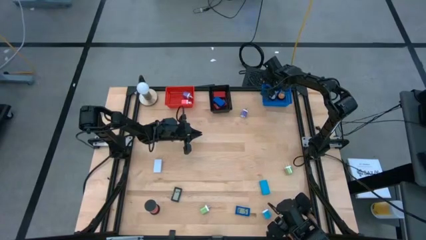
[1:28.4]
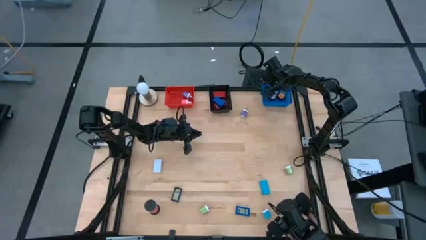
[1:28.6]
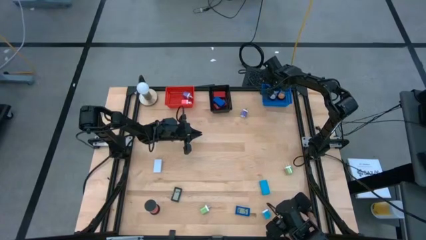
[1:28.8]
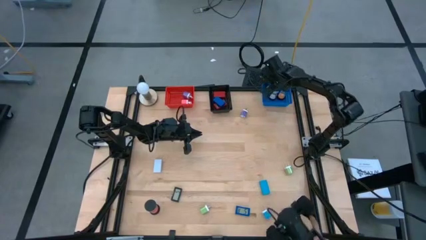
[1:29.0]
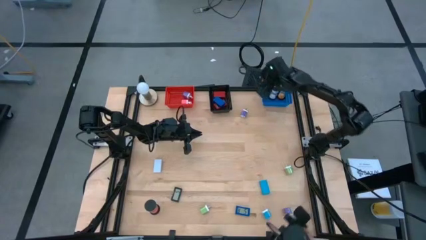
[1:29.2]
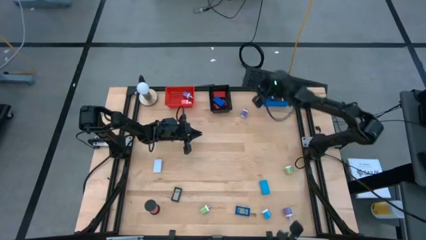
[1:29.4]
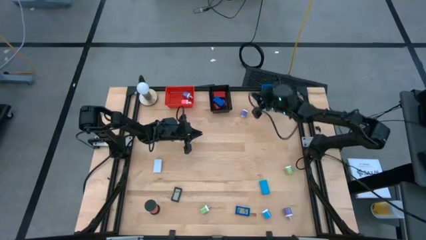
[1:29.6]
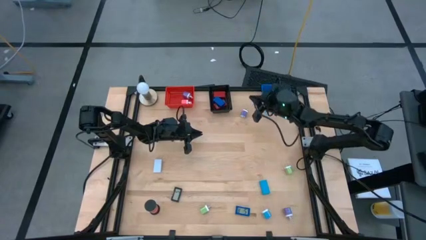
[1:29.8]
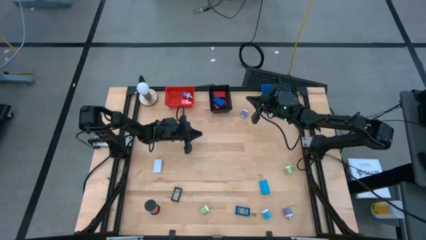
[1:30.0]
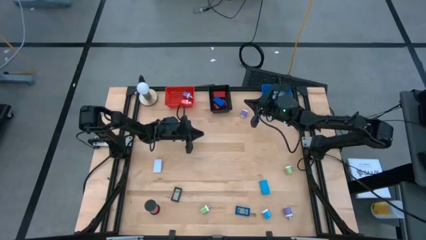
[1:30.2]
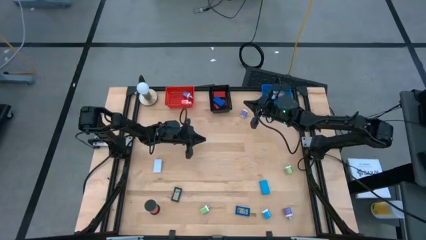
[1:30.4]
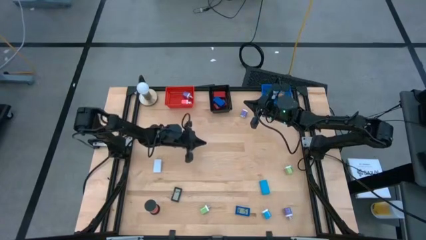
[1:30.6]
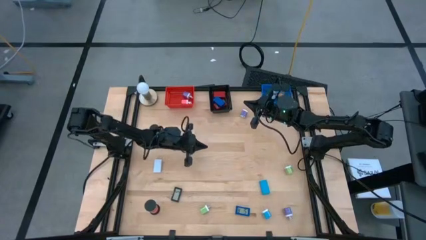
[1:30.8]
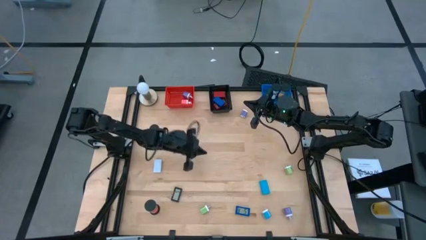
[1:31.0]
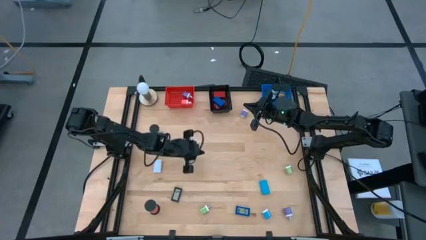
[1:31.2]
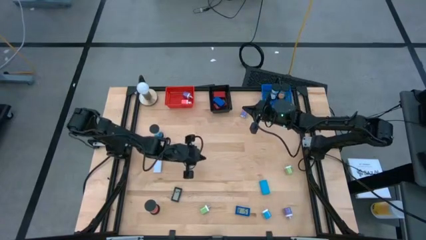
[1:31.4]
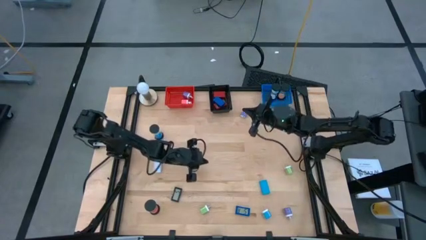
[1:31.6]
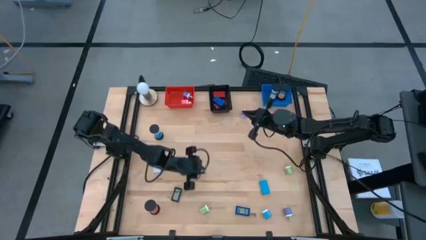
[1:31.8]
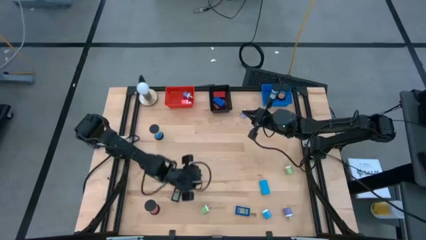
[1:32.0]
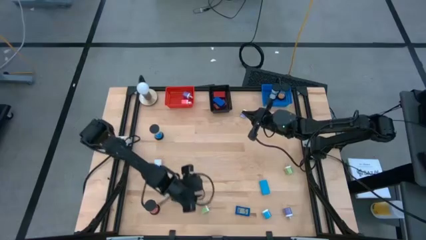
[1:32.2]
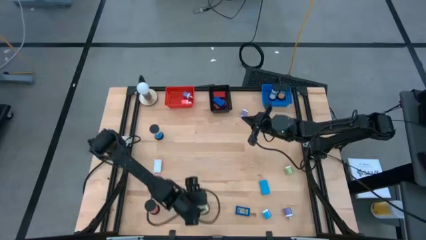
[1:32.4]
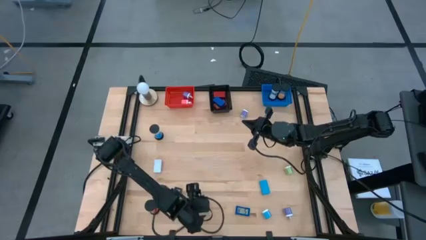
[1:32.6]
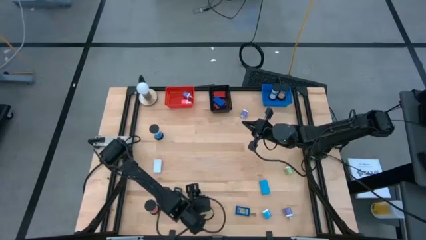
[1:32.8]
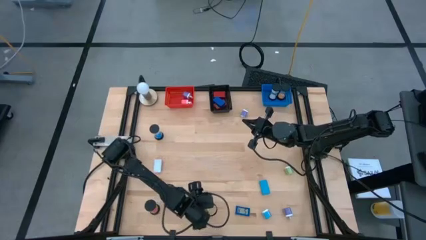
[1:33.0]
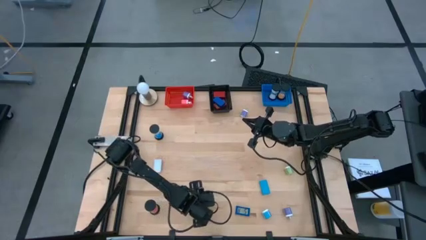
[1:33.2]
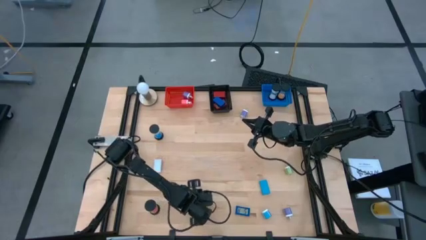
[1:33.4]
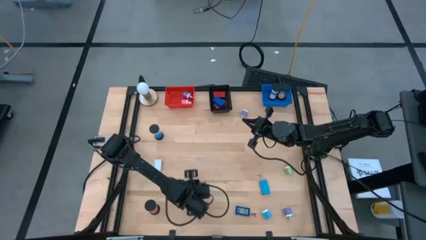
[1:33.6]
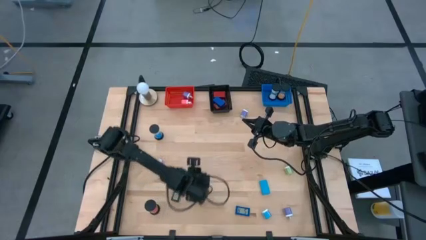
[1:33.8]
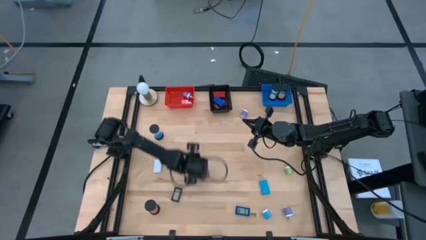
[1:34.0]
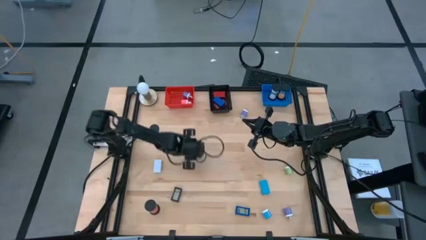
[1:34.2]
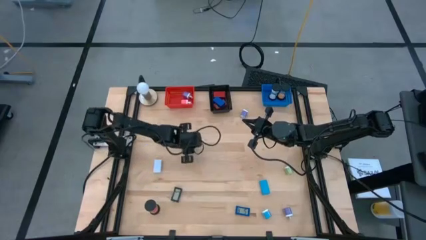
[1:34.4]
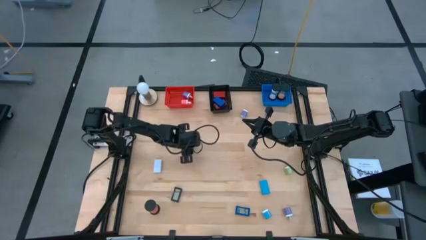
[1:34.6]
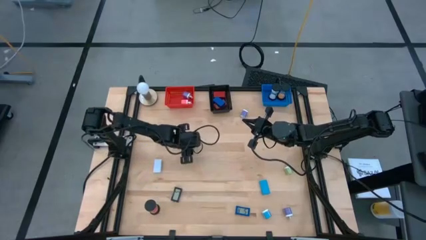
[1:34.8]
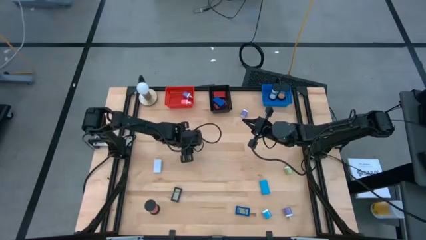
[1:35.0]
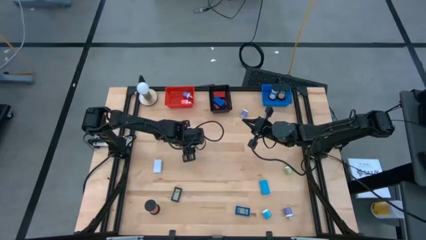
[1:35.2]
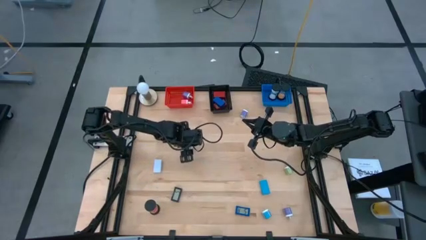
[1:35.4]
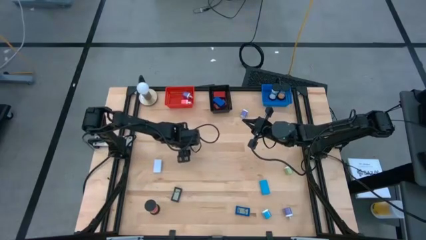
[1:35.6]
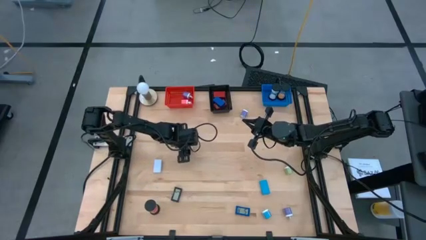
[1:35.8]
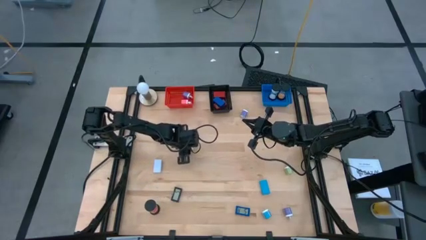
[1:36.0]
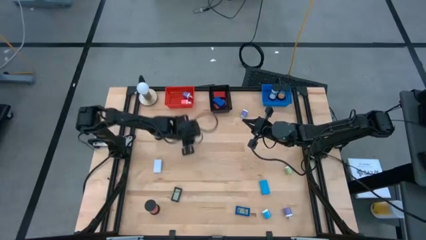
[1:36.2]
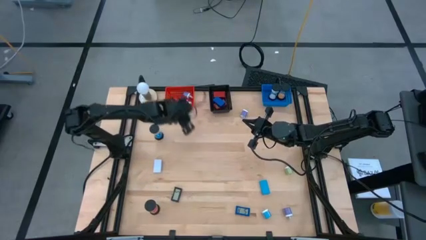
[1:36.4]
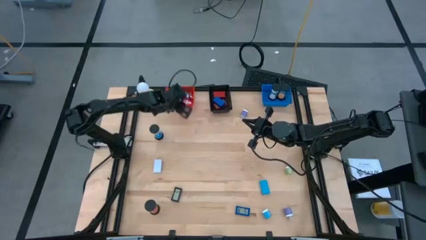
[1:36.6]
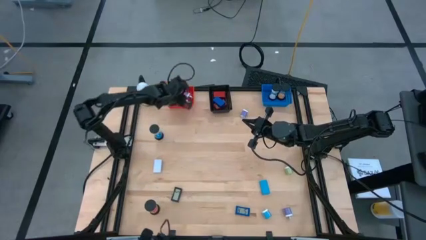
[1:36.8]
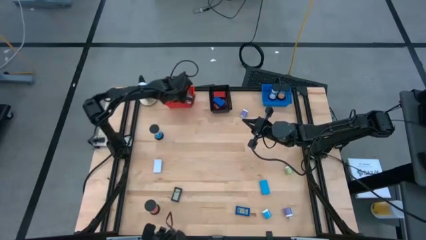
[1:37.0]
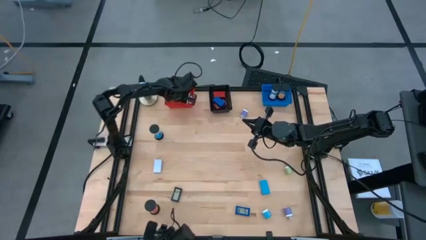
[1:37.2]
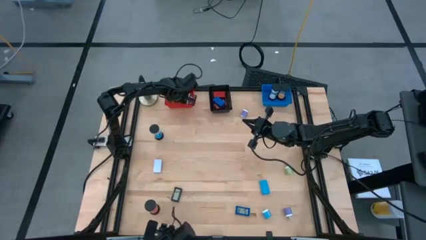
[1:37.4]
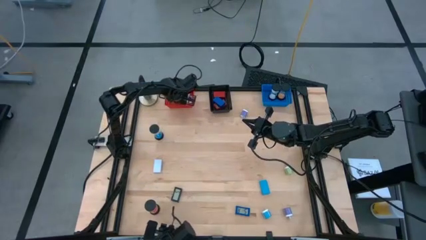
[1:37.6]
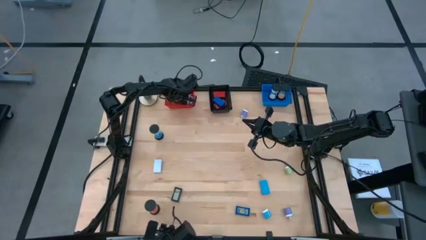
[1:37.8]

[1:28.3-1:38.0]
Task: Pick & Place Office items
Put the left green charger adapter into the red bin

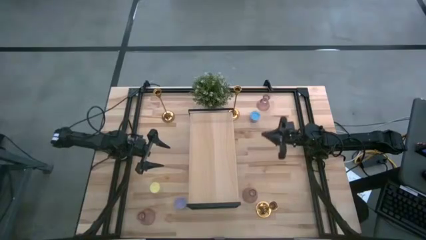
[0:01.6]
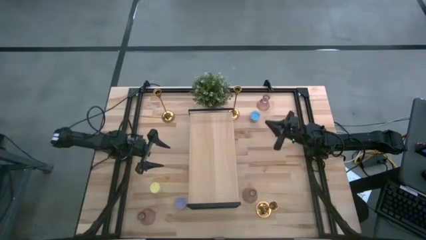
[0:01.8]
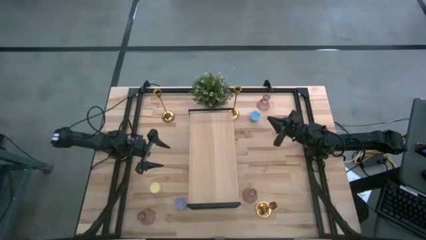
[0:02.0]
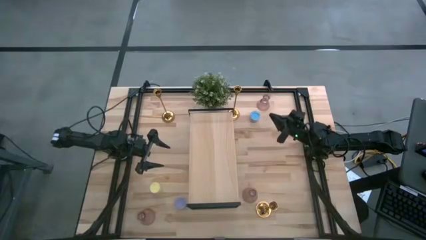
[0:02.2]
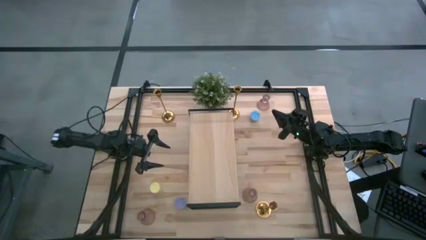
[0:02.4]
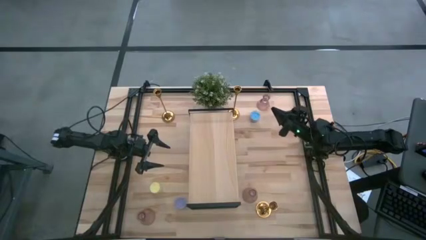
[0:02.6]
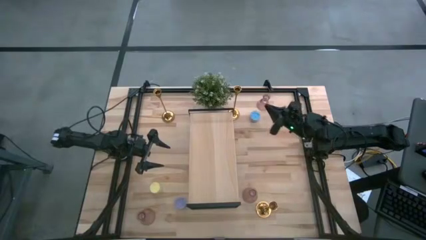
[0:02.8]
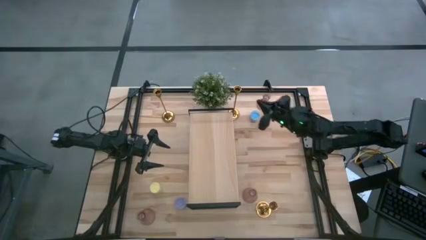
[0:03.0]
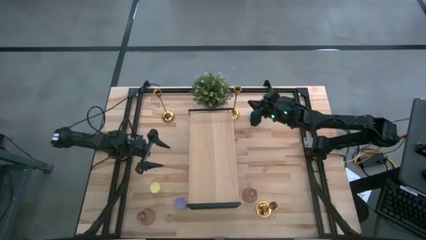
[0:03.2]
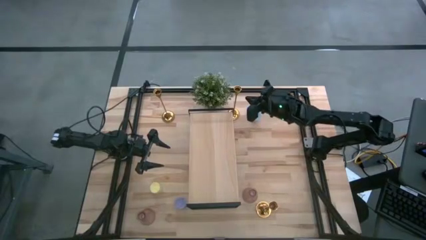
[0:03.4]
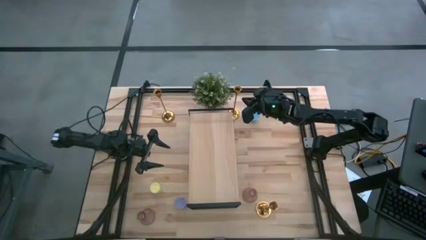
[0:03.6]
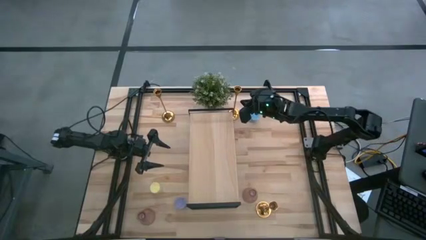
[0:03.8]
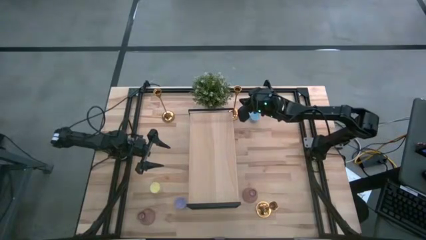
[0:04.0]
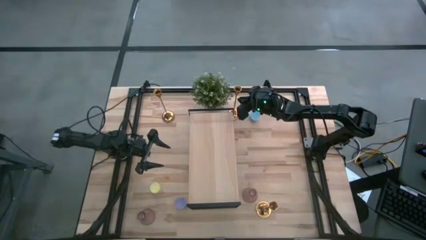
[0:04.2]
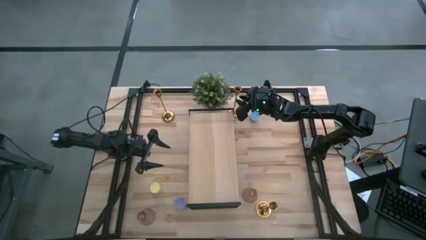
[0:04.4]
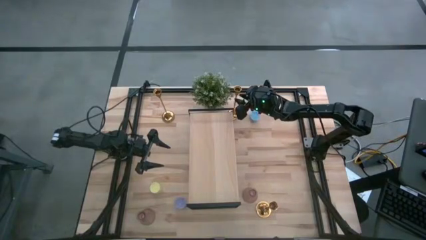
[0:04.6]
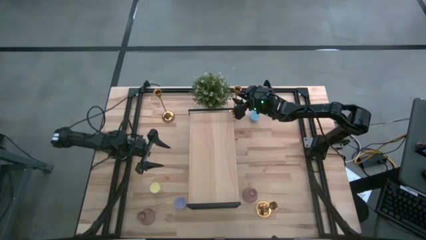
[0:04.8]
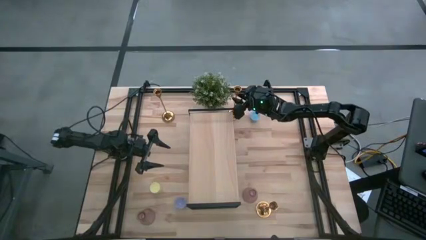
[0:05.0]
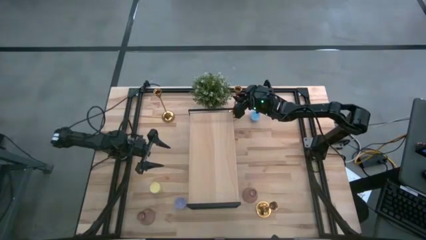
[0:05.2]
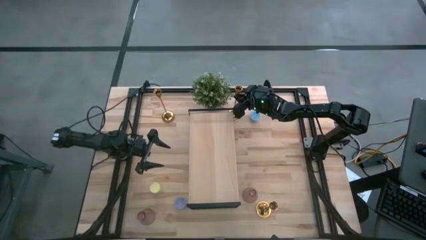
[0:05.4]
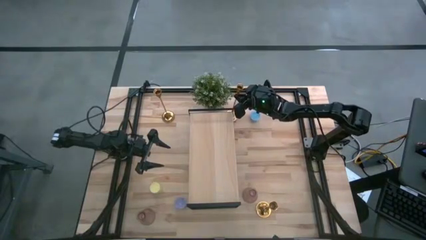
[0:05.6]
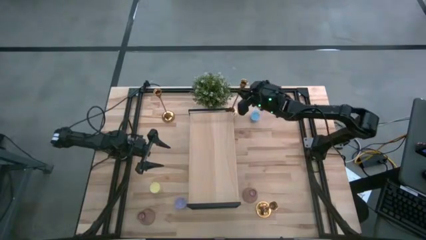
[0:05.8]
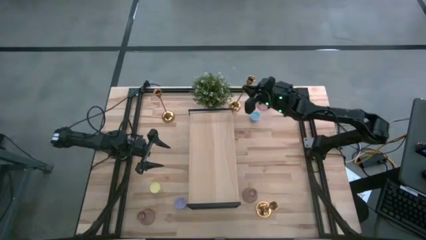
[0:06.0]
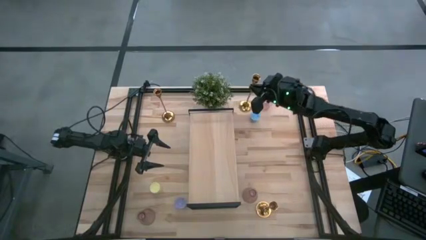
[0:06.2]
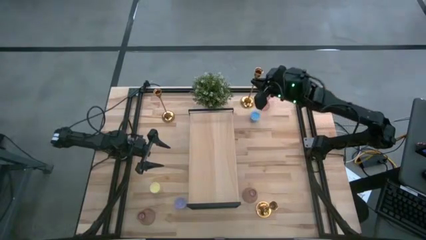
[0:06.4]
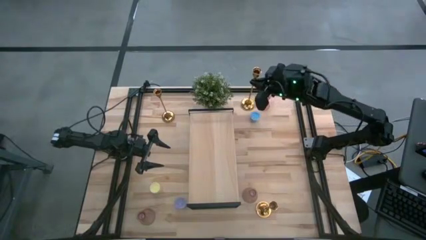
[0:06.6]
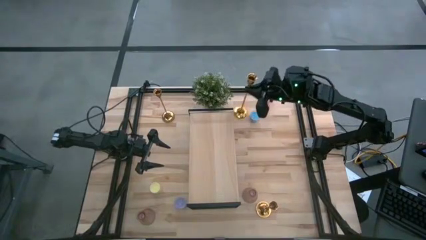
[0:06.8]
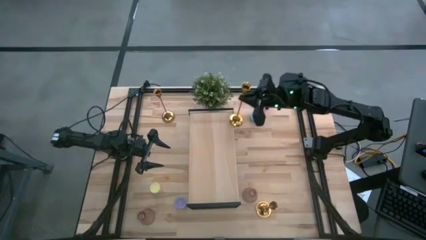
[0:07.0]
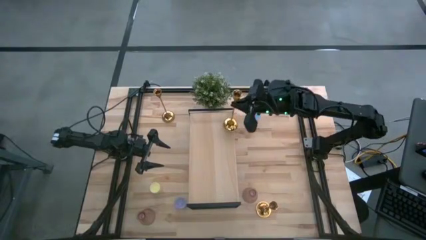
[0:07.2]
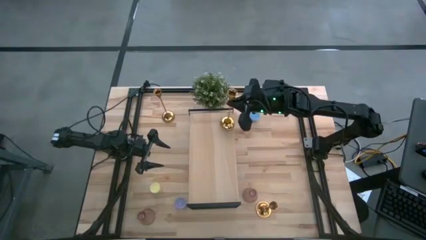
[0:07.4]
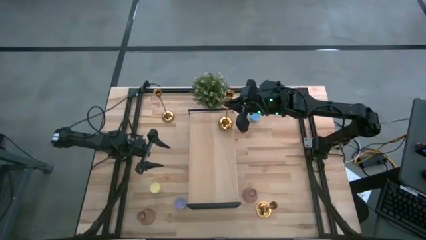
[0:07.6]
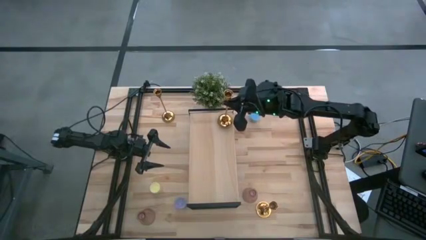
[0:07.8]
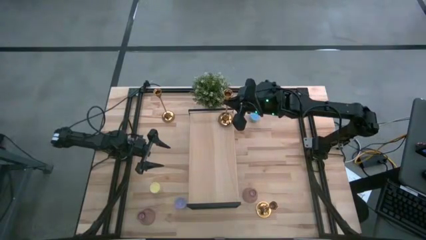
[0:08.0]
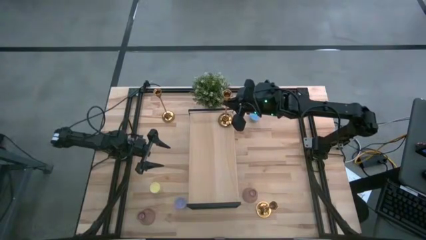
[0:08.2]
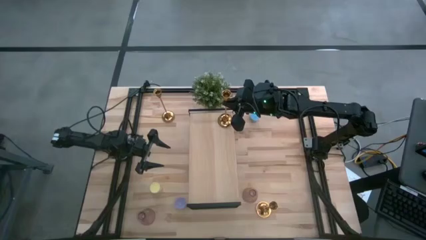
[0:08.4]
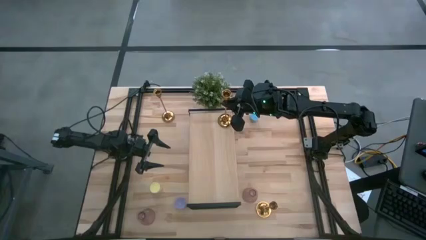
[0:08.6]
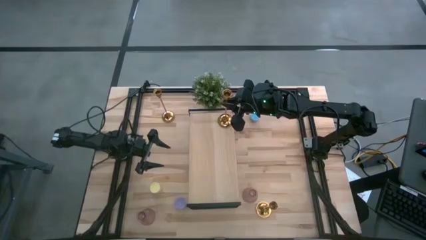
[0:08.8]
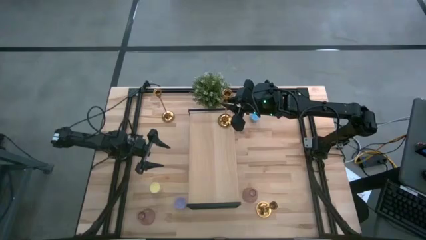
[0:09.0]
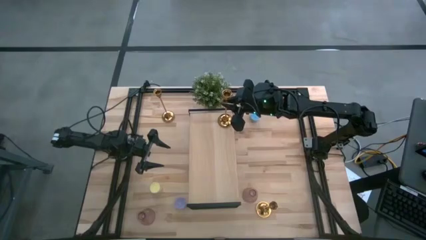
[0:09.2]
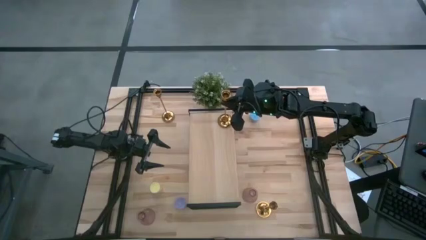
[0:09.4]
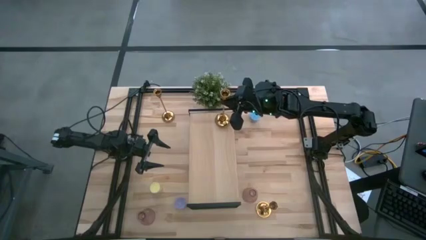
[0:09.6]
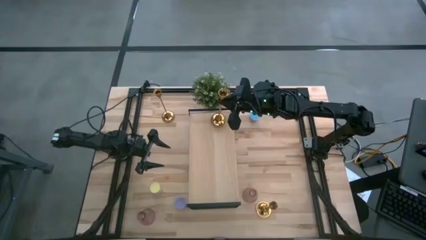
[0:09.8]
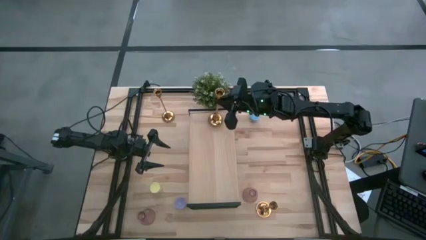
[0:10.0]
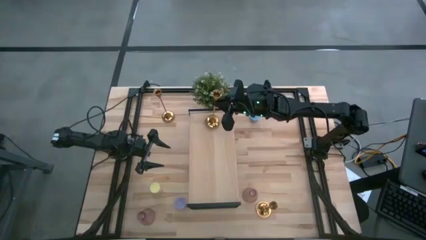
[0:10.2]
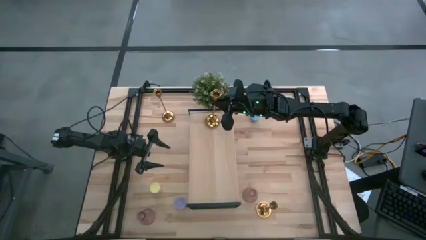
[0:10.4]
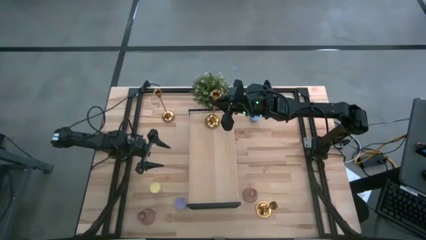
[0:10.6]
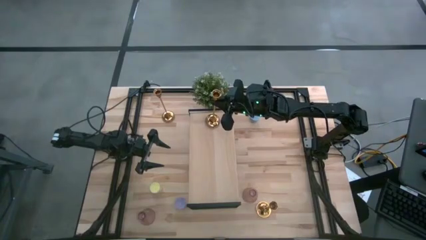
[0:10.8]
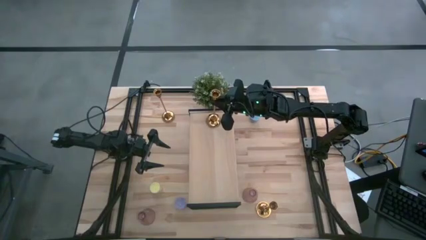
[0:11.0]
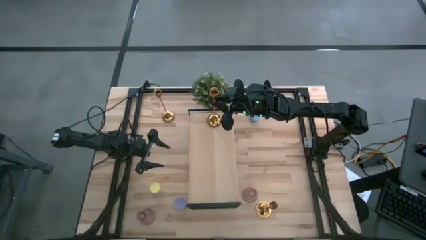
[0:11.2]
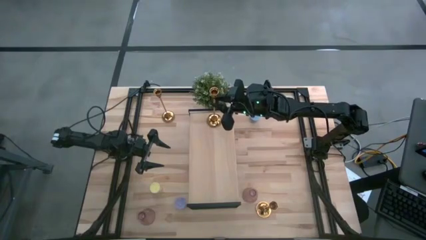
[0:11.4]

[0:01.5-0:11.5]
Task: Pick & Place candle stick holders
Put the top right gold candle holder on the shelf
